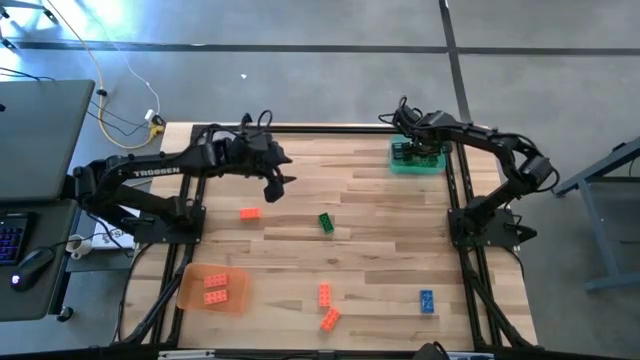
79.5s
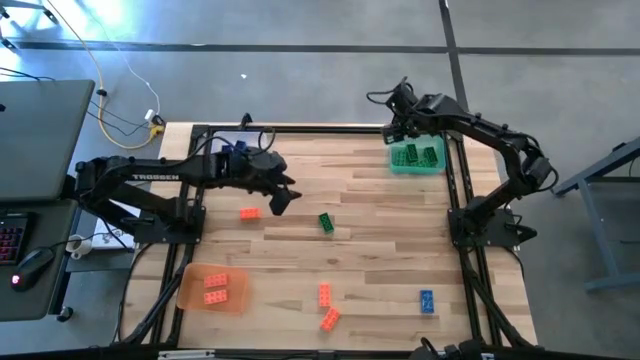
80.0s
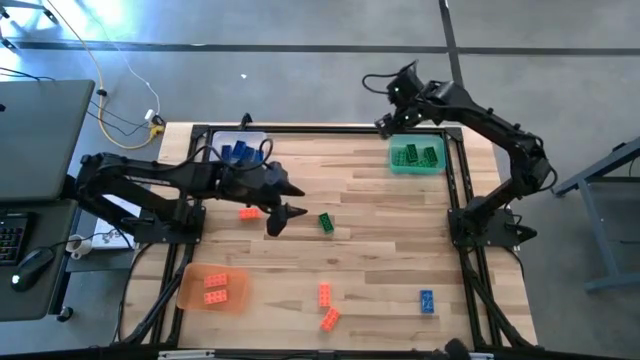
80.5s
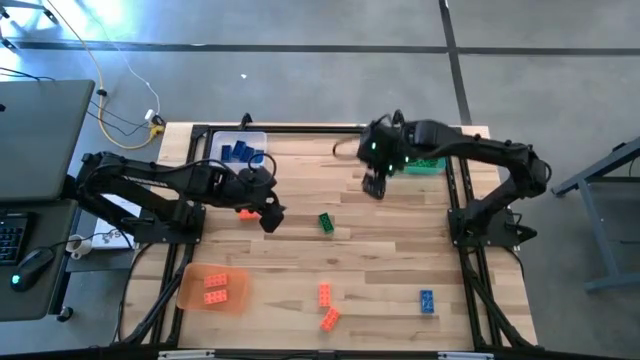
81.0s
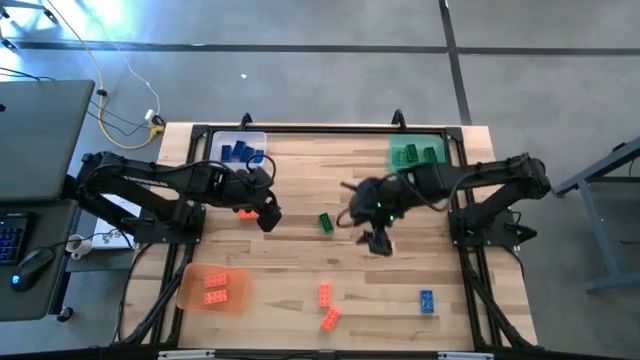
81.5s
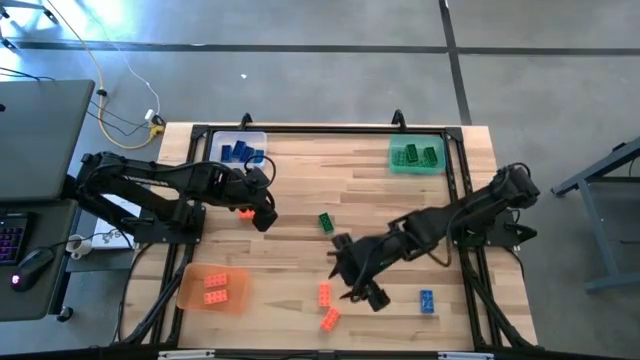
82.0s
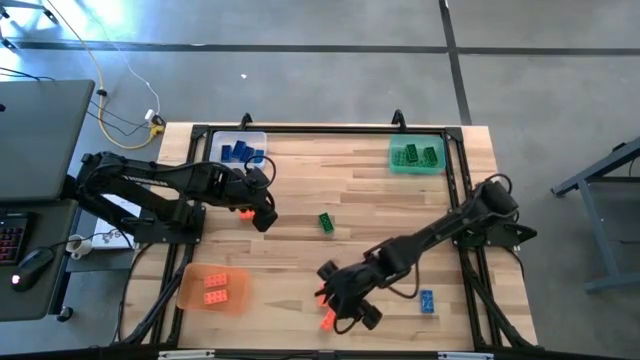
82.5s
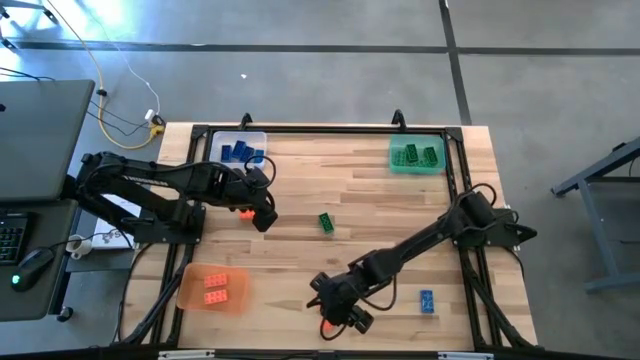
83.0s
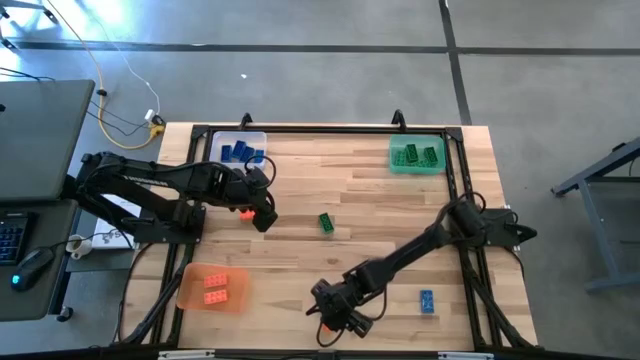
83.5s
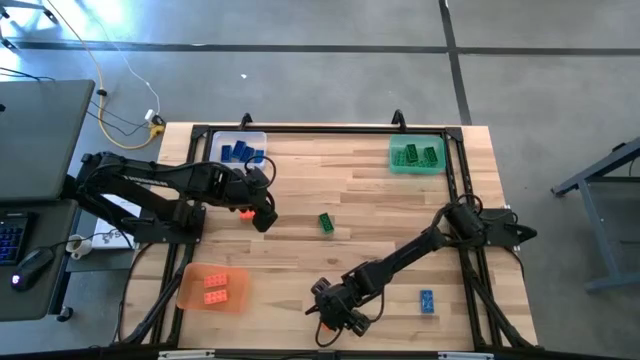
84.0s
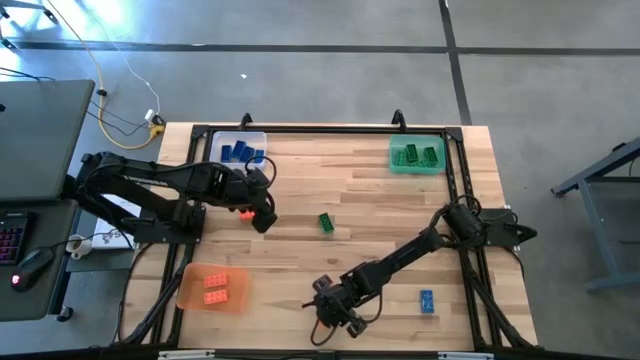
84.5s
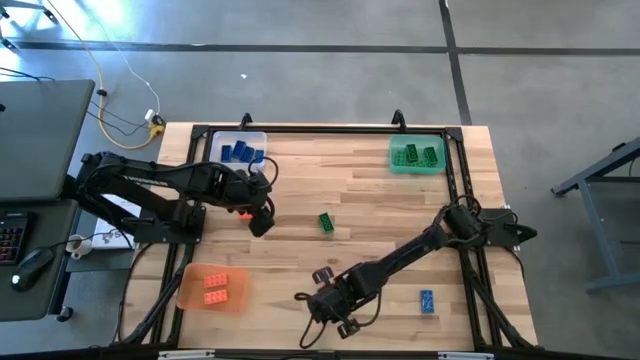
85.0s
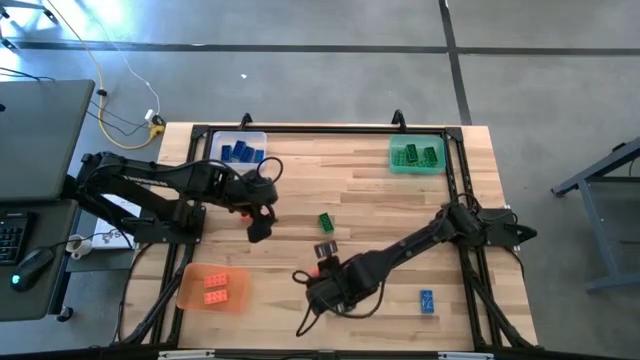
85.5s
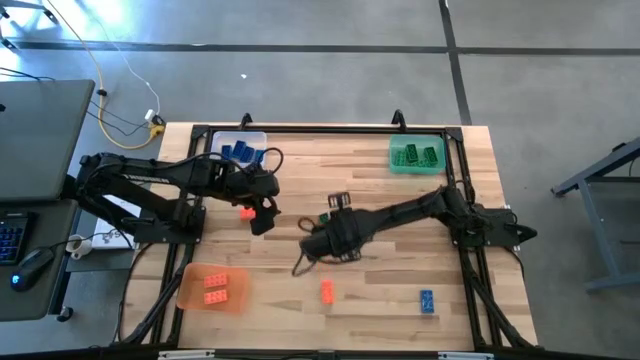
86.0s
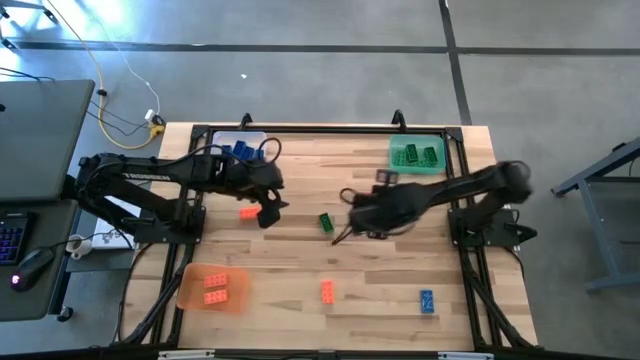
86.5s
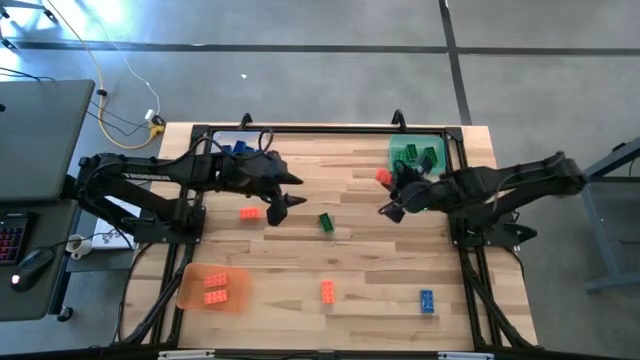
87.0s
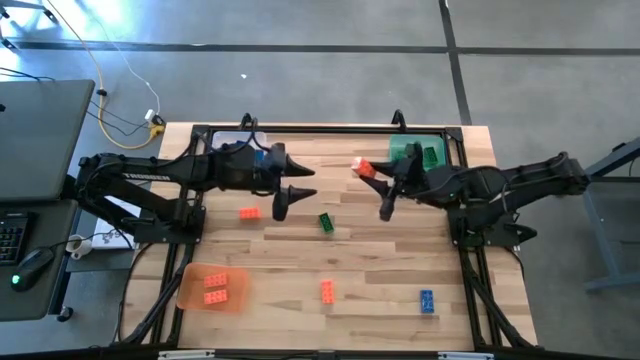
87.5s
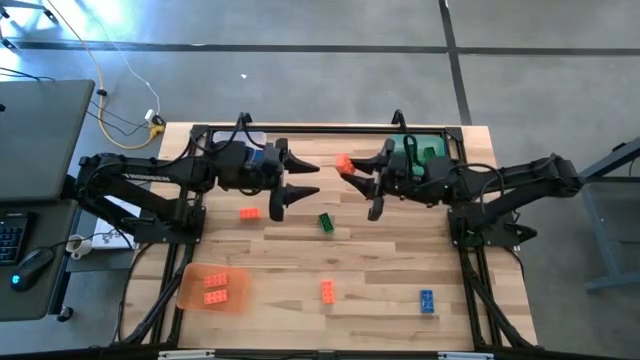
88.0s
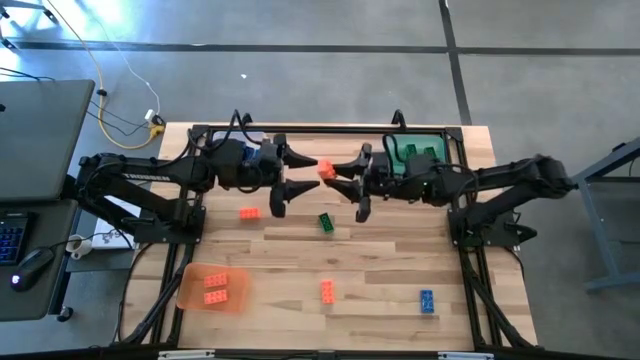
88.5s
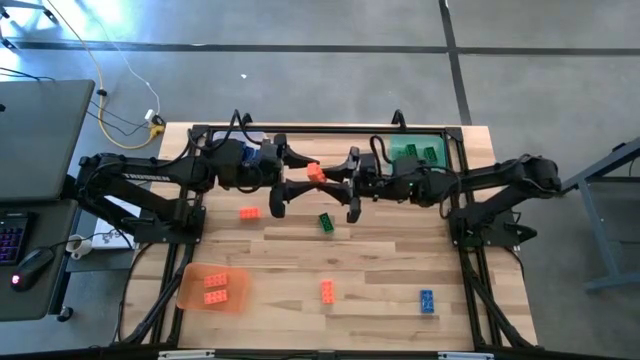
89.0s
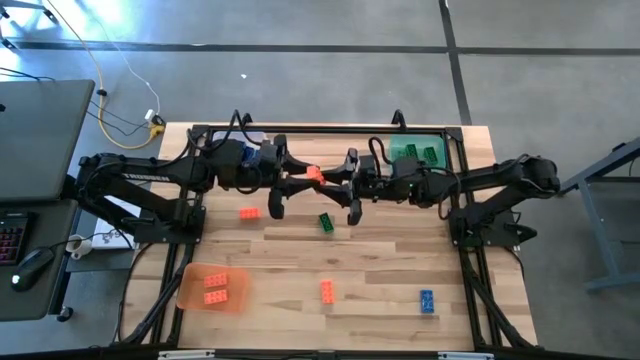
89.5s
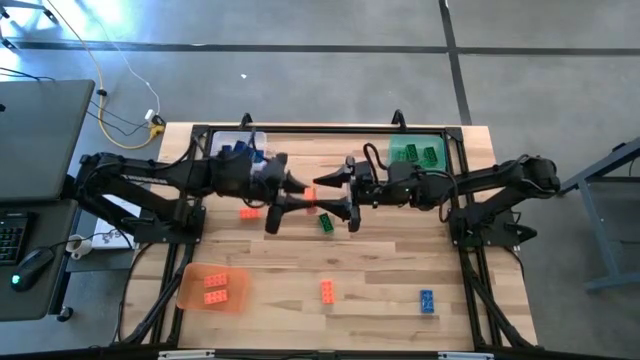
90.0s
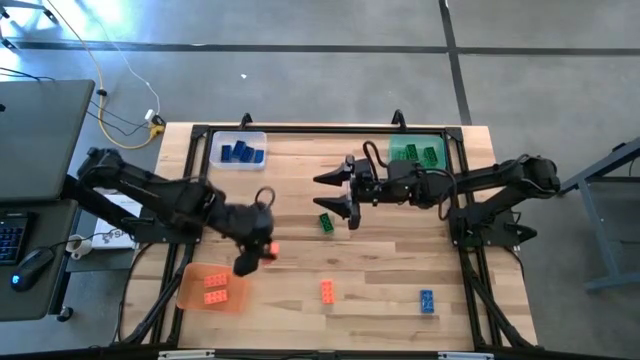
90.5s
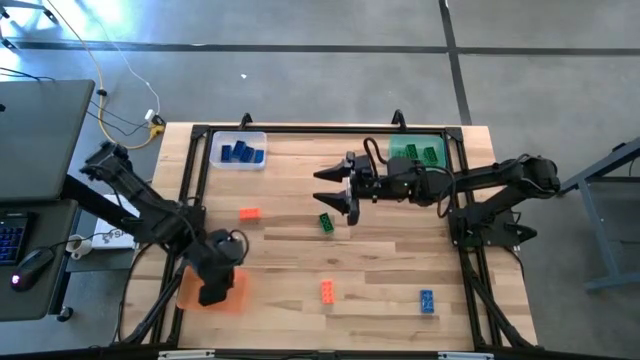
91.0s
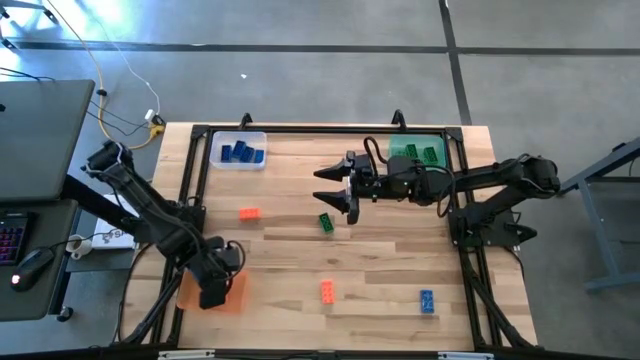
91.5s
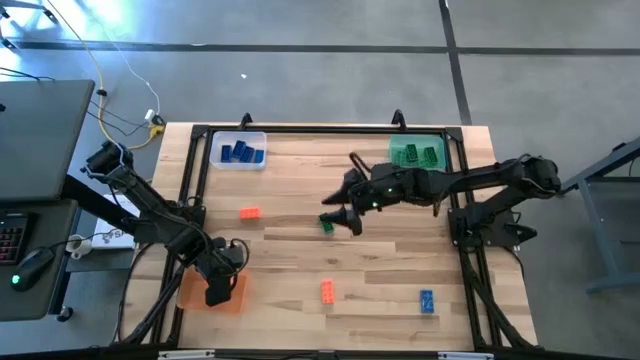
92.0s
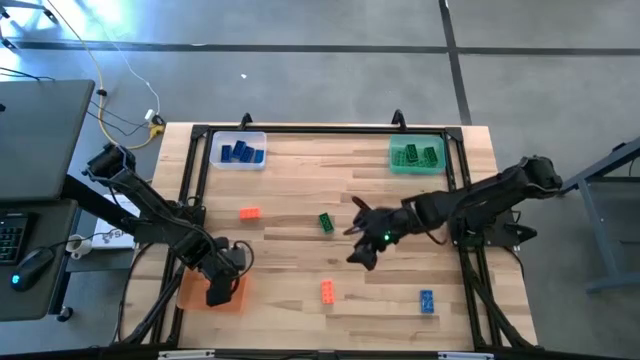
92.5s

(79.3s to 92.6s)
Task: Sort & place blocks by color
Put the orange game piece into the orange bin

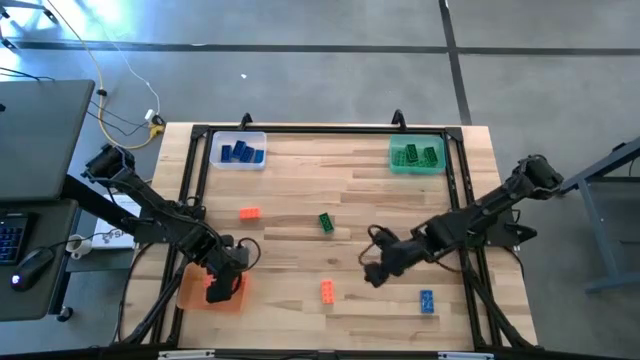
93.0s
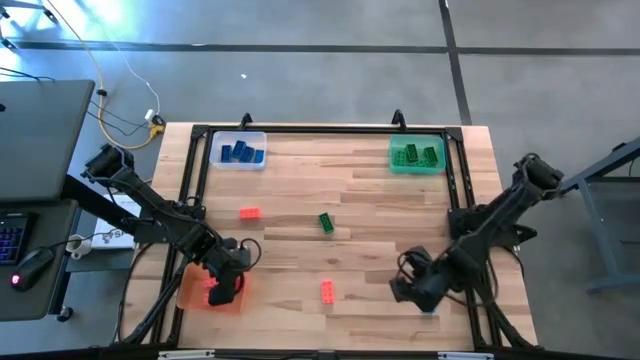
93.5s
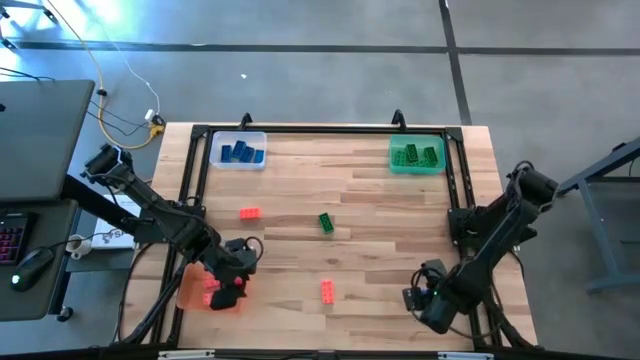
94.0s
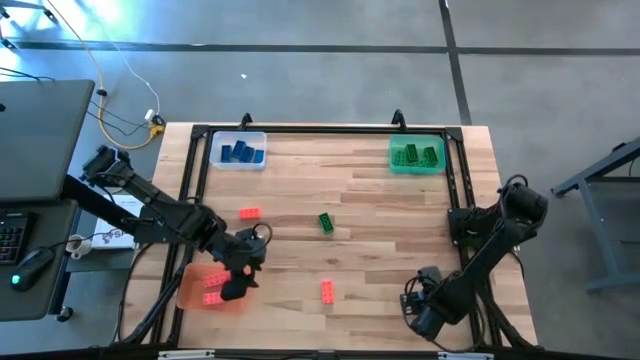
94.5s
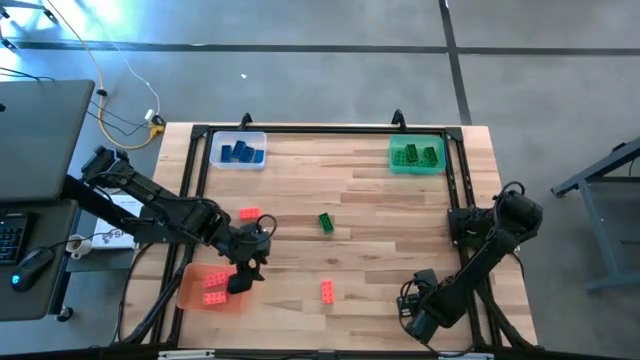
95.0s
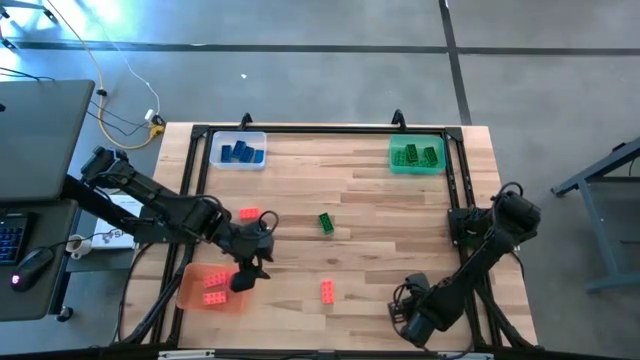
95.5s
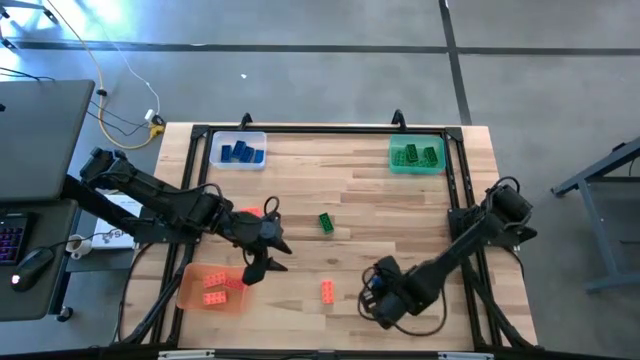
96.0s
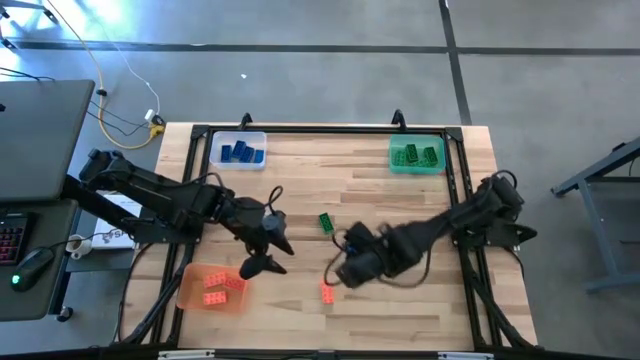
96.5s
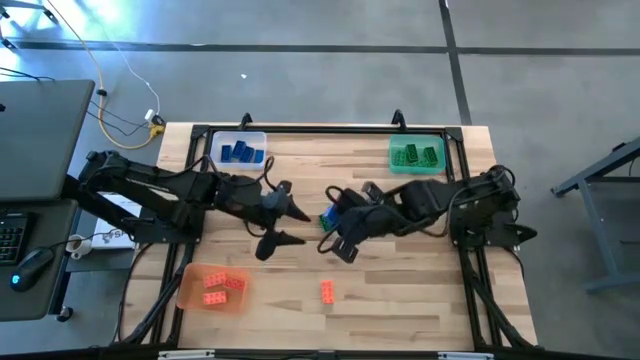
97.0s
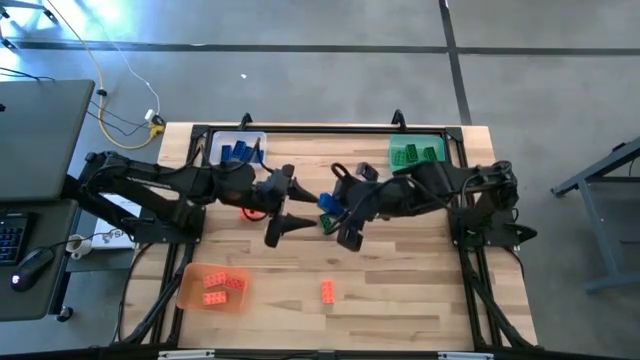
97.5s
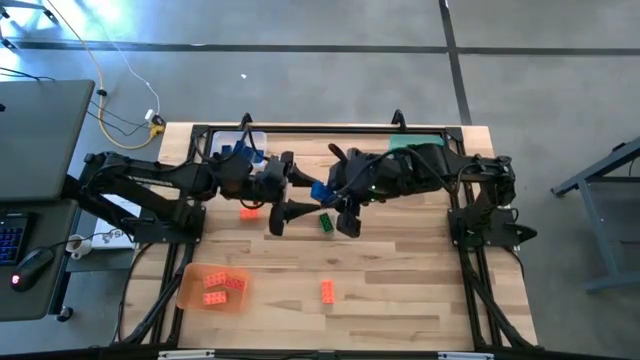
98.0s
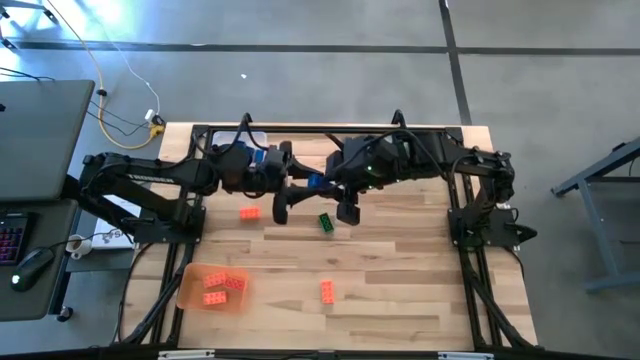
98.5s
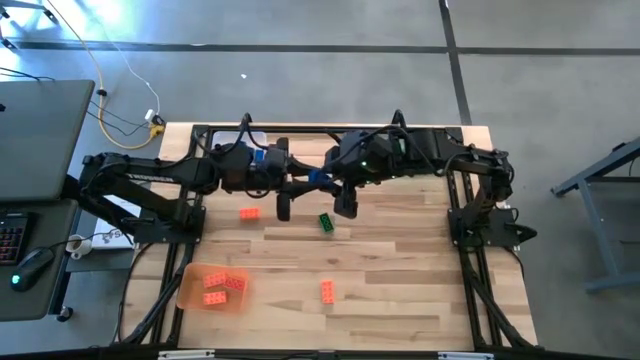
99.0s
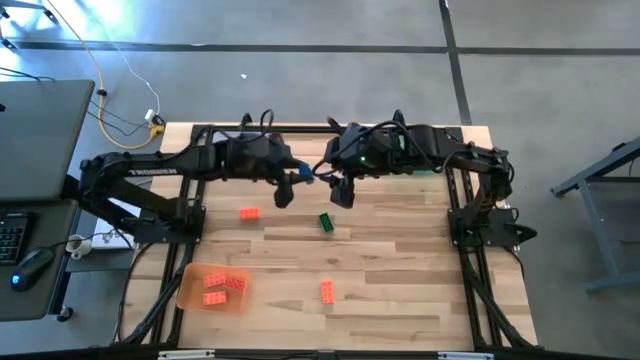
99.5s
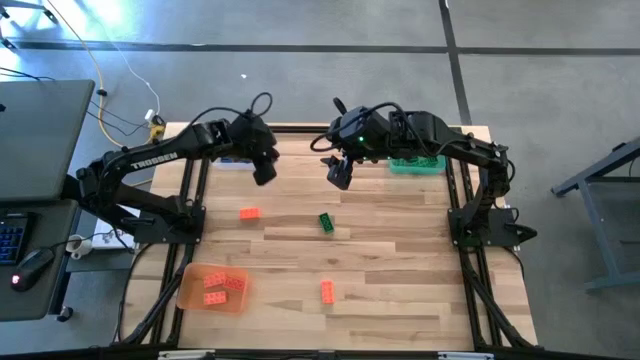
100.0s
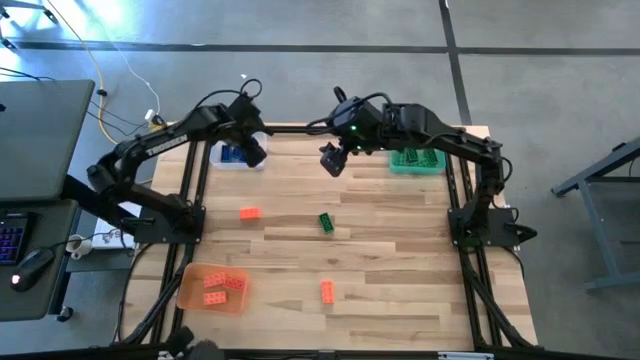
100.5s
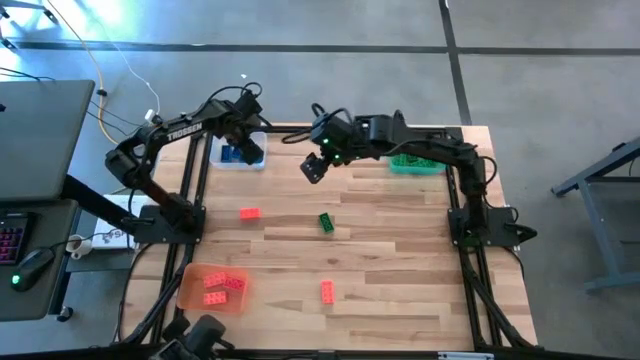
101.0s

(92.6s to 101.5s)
Put the blue game piece into the transparent bin
